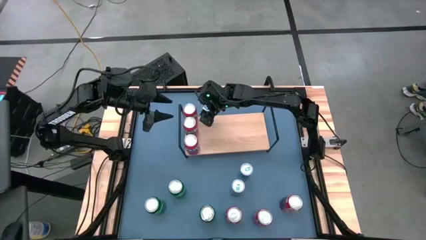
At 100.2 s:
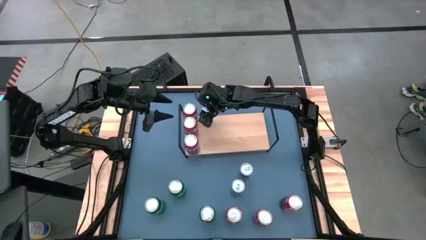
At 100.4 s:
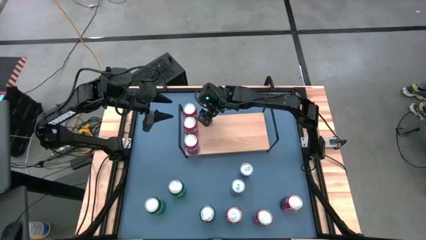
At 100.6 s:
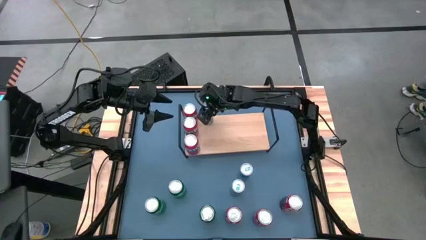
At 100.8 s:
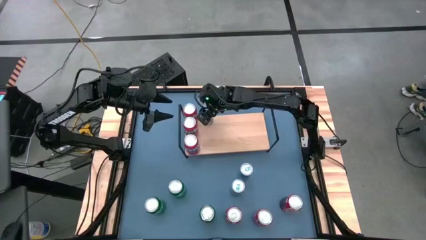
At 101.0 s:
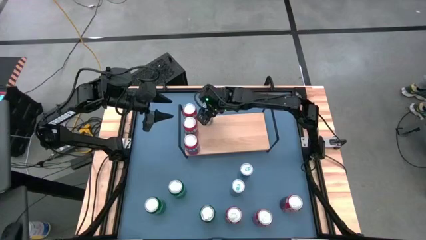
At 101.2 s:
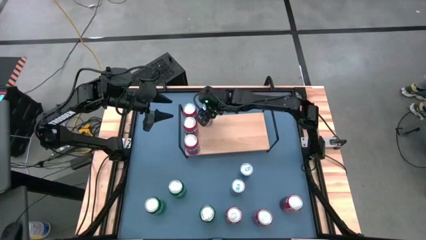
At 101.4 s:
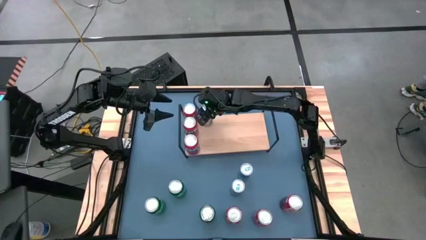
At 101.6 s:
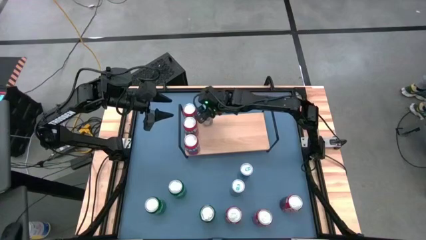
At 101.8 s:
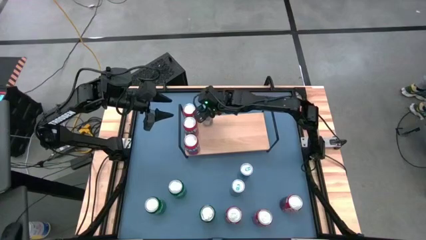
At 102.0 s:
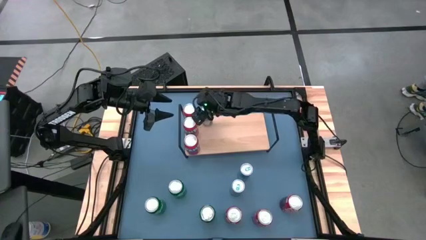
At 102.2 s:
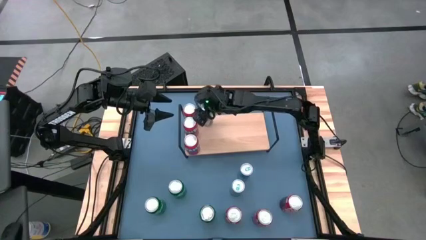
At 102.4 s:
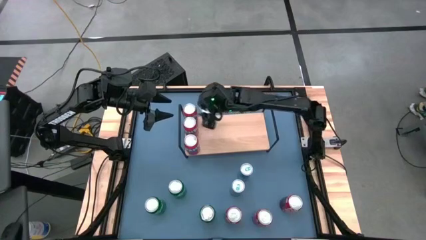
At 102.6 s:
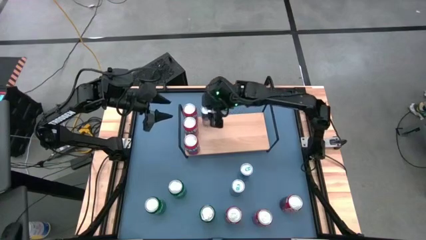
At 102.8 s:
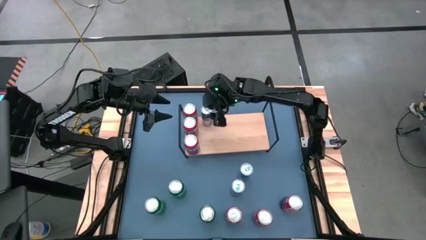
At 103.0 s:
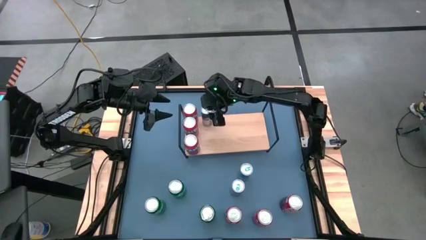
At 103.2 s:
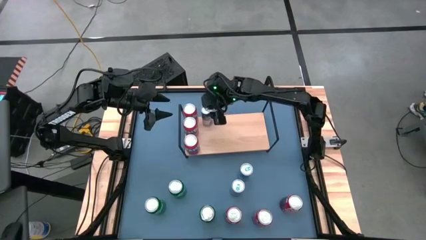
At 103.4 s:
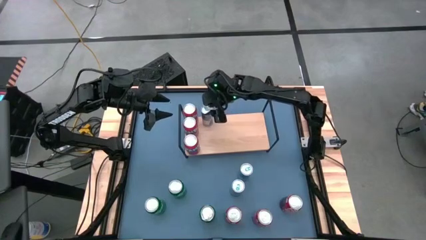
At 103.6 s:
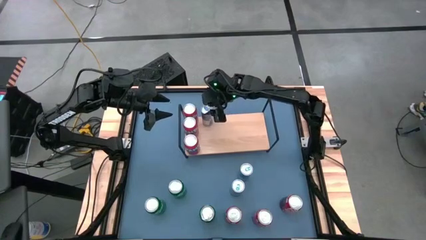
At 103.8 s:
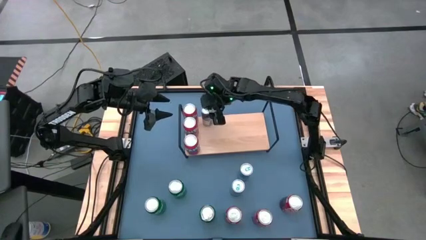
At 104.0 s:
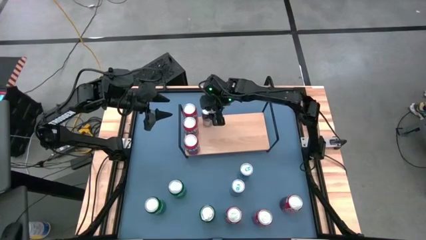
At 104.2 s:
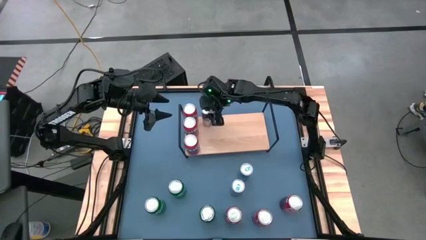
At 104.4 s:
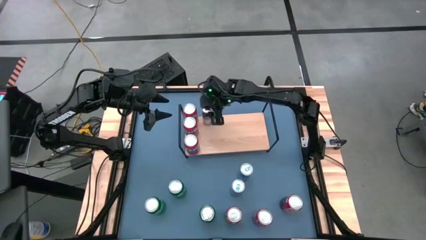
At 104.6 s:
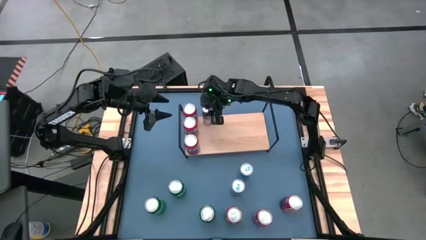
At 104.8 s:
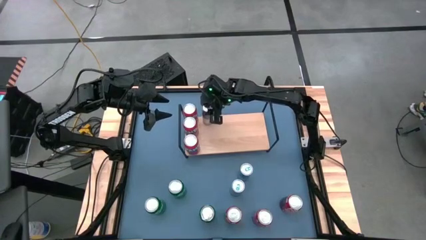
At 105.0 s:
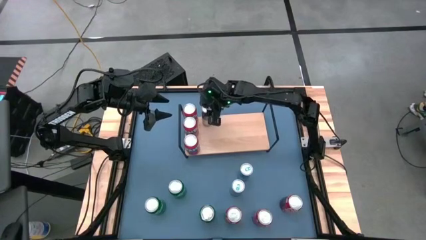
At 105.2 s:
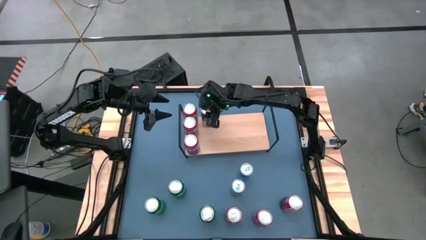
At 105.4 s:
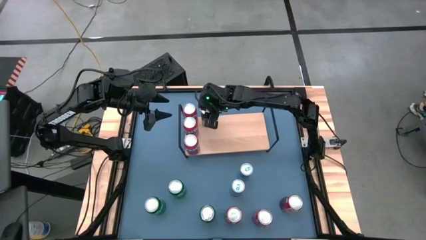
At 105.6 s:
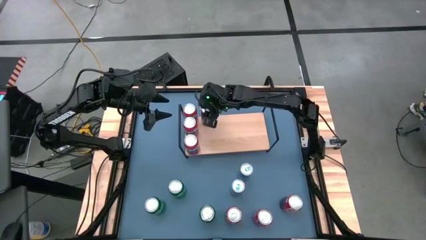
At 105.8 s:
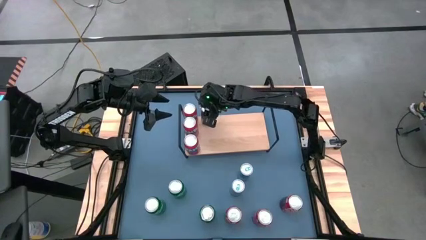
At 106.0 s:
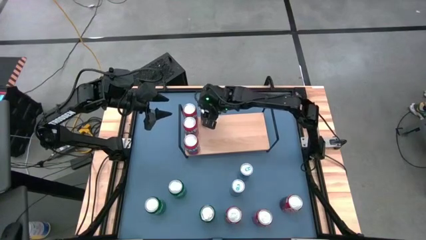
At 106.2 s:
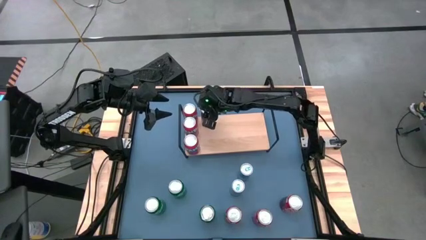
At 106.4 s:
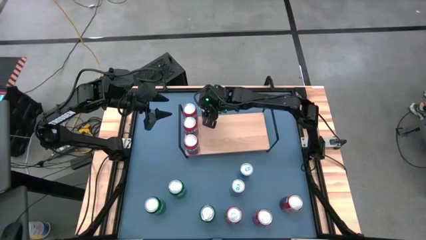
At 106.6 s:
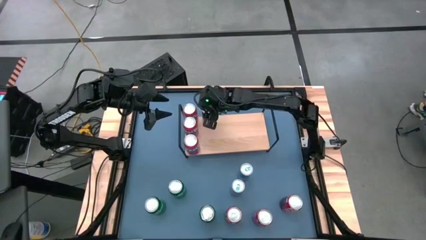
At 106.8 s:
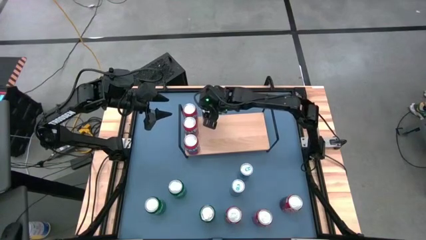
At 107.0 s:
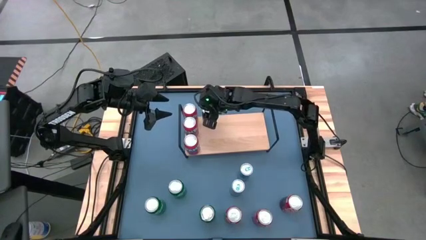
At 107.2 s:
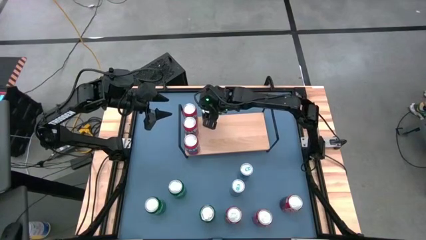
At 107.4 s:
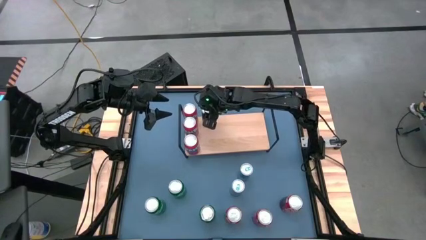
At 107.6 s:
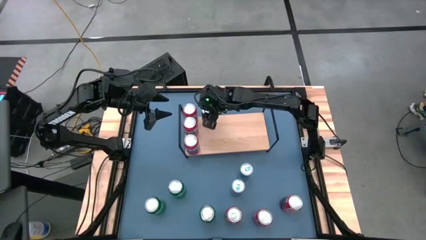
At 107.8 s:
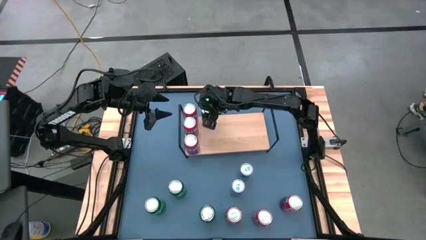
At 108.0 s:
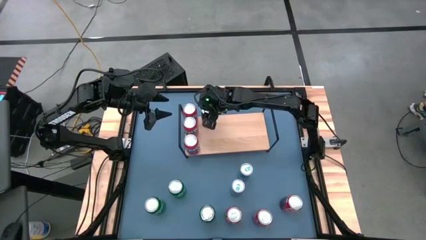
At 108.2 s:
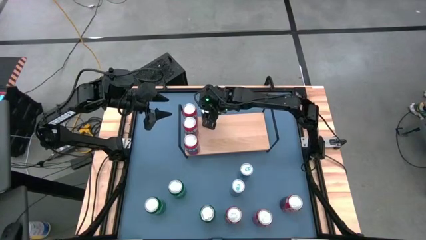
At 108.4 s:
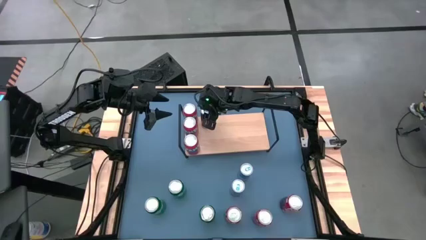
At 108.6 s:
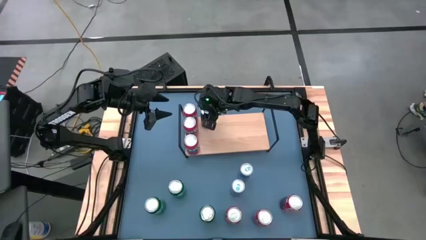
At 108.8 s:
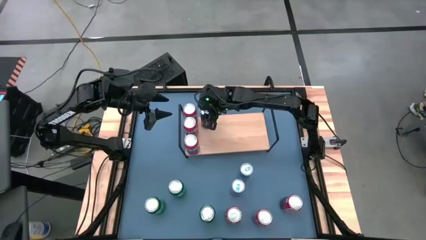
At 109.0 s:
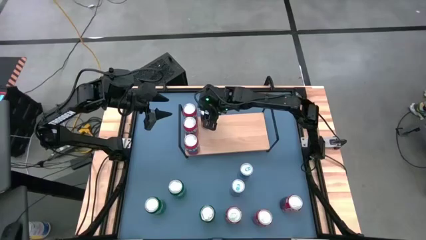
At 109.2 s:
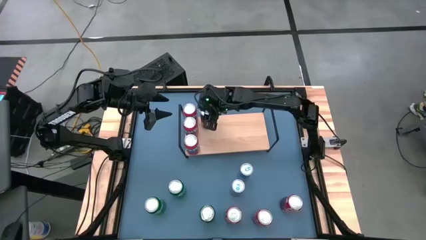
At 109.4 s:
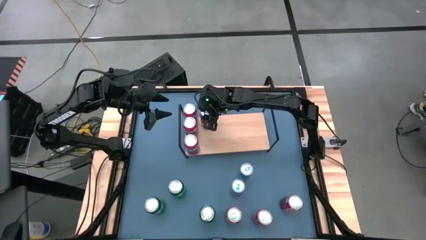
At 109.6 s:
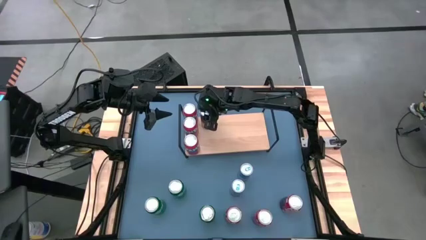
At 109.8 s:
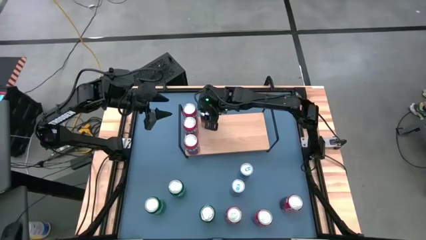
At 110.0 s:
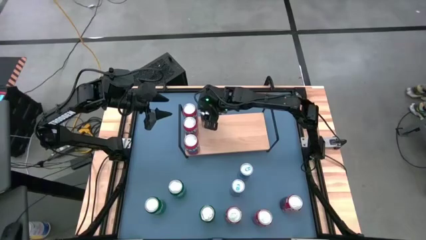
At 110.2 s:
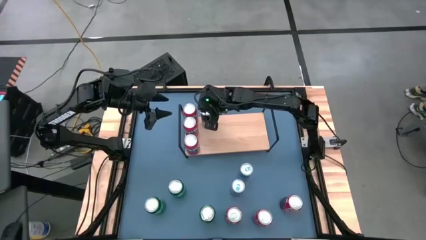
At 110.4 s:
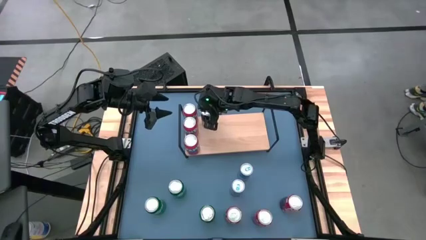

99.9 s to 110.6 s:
Task: Place canned beverage on shelf
Put the blue soda can on the shelf
